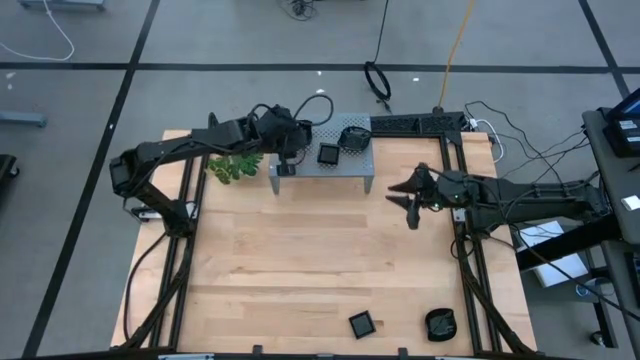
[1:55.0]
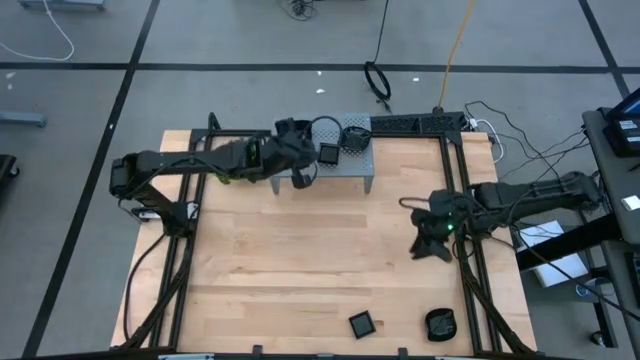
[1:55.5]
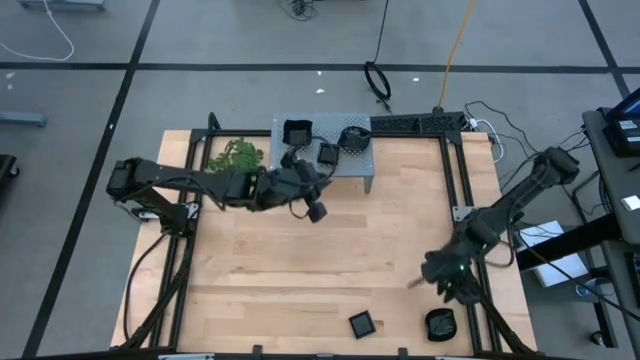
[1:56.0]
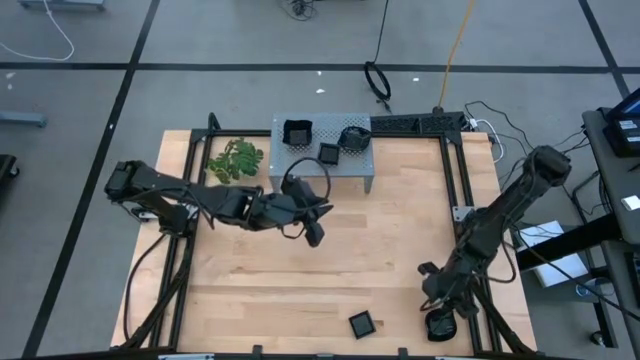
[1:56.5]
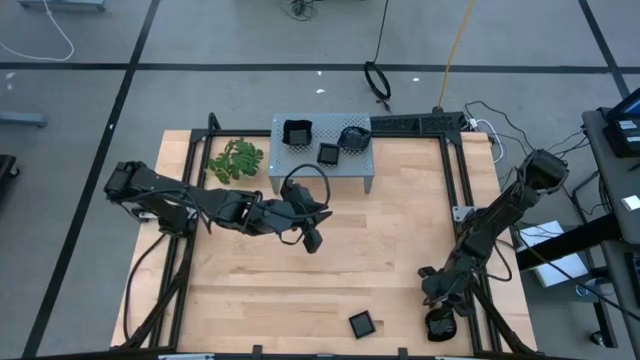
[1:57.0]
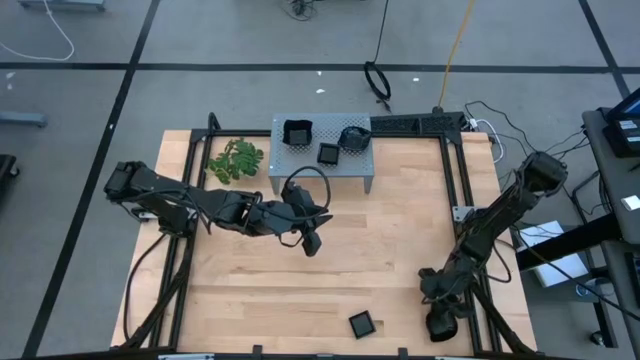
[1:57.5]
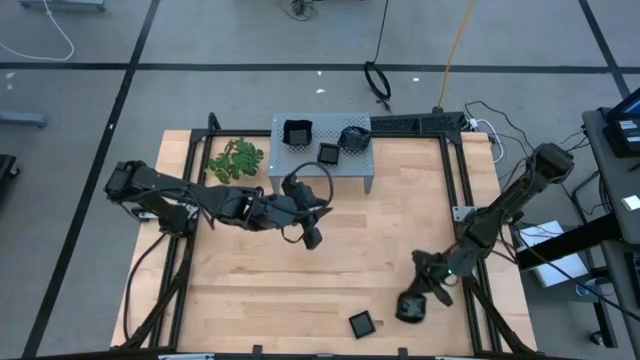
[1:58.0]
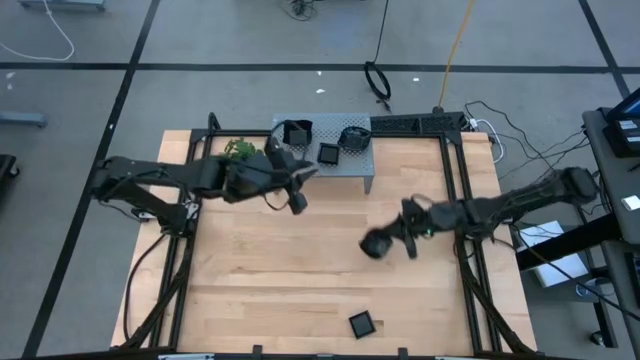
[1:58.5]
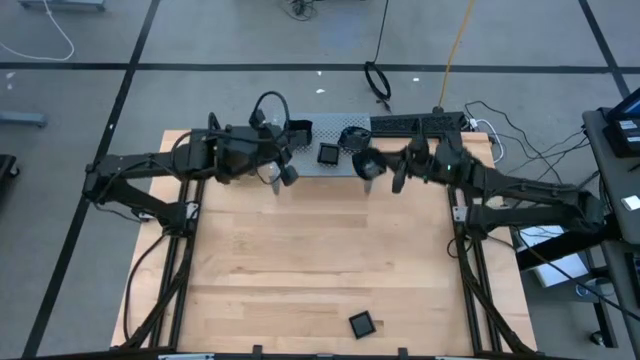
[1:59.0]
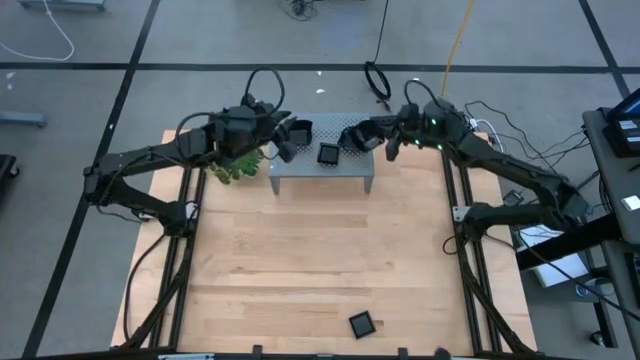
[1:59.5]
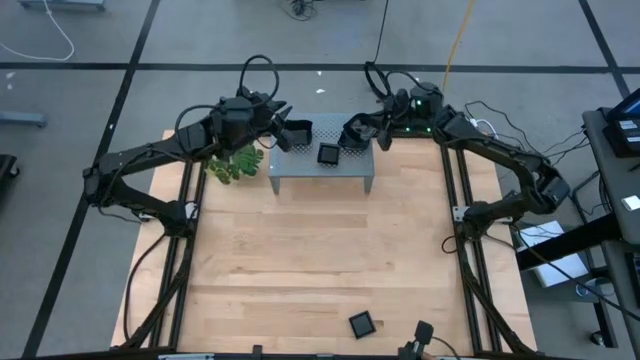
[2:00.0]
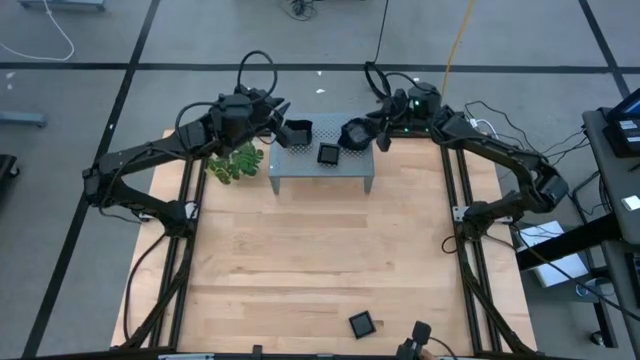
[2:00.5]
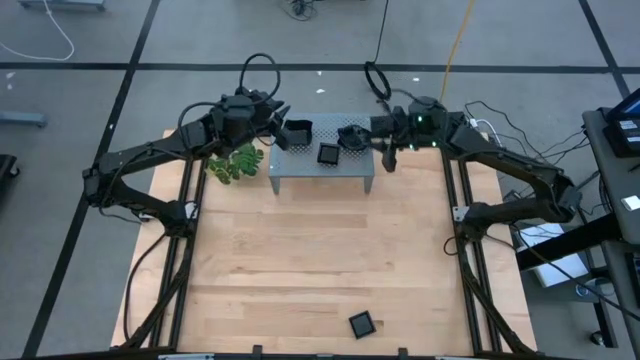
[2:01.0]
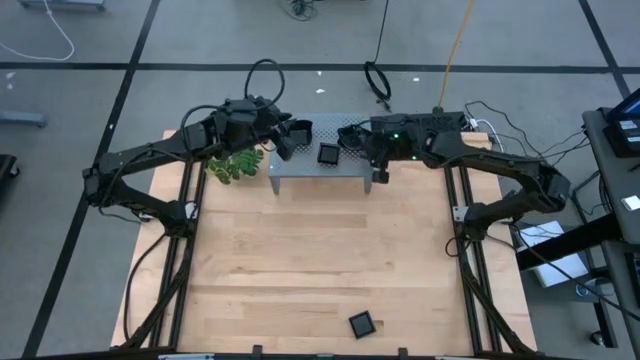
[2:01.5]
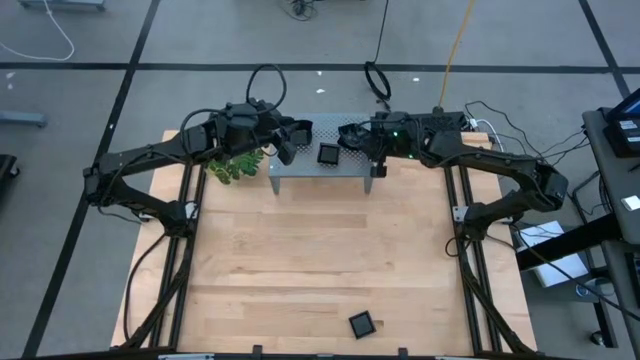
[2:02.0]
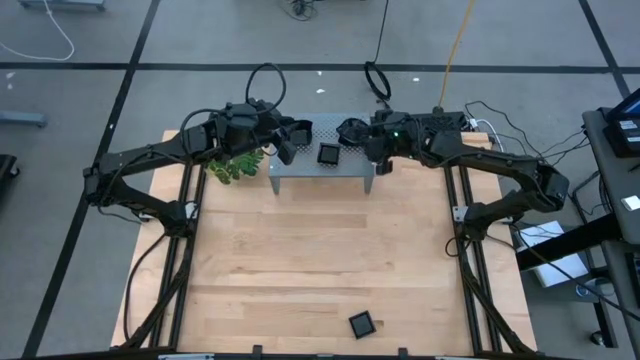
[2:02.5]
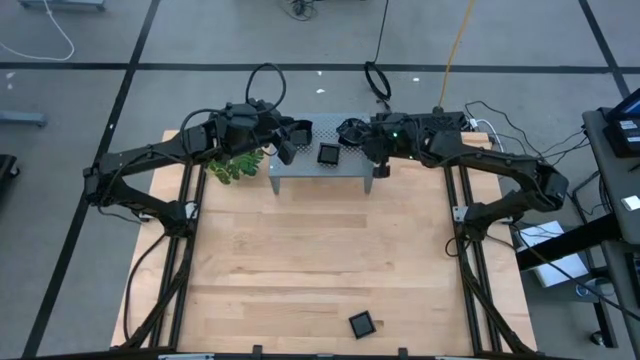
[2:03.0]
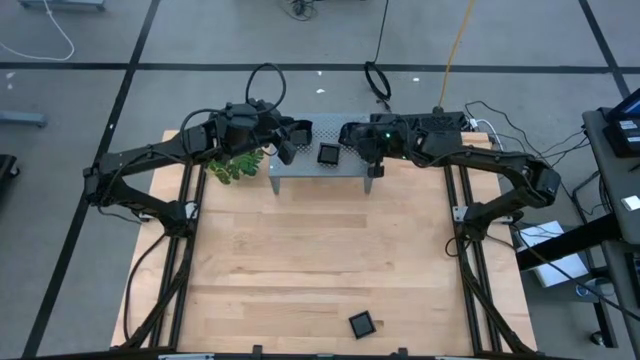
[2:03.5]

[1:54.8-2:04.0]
Task: Pick & Place Mini shaped plates
Stack the black leaf-shaped plate on top of the black leaf-shaped plate on the shelf

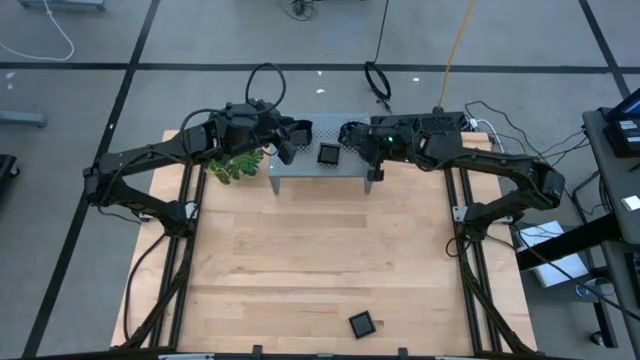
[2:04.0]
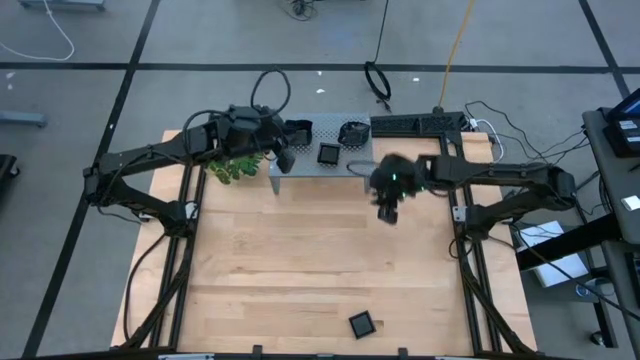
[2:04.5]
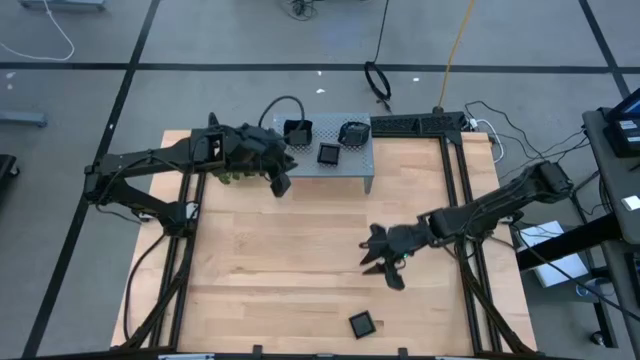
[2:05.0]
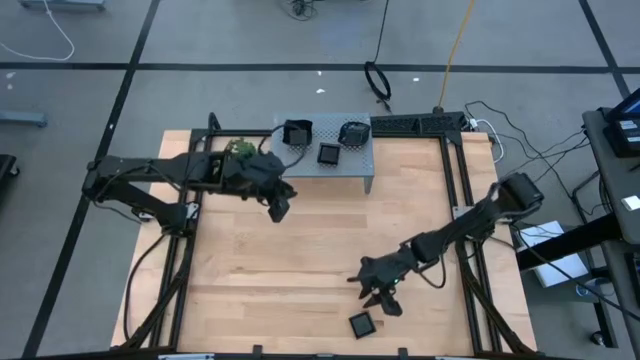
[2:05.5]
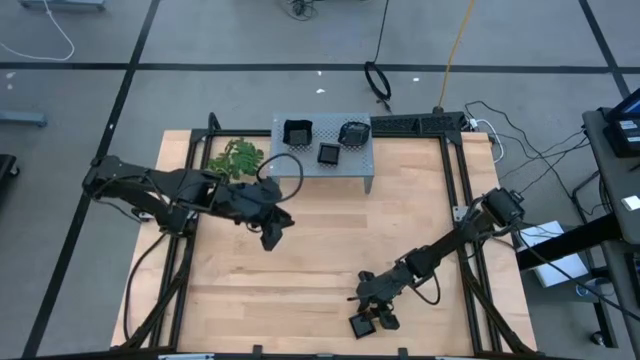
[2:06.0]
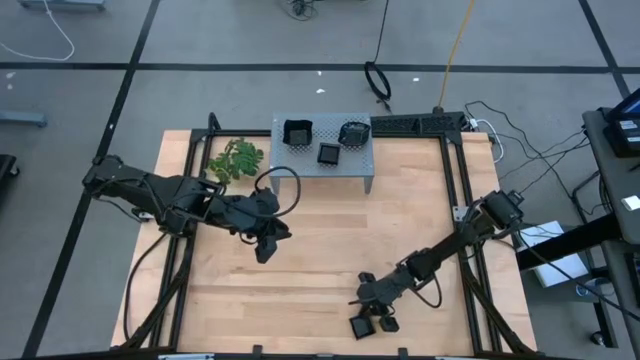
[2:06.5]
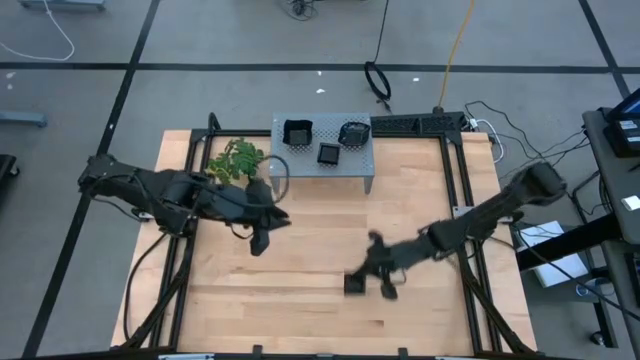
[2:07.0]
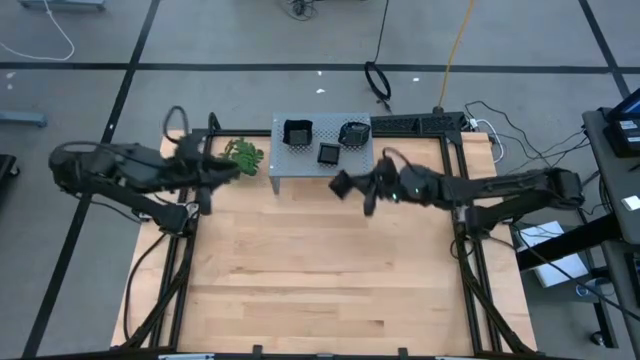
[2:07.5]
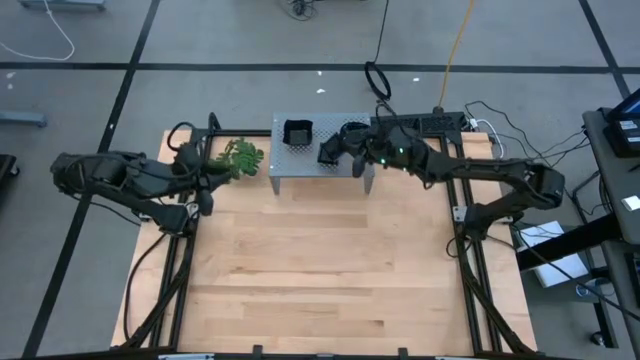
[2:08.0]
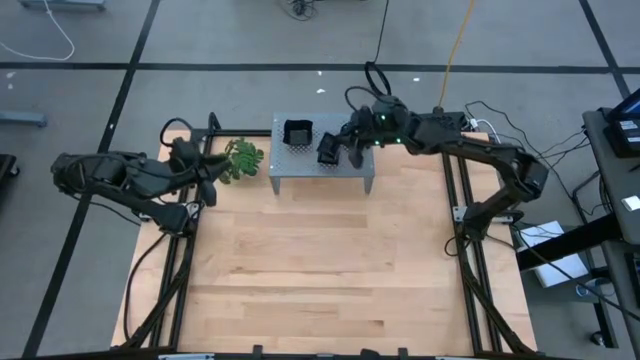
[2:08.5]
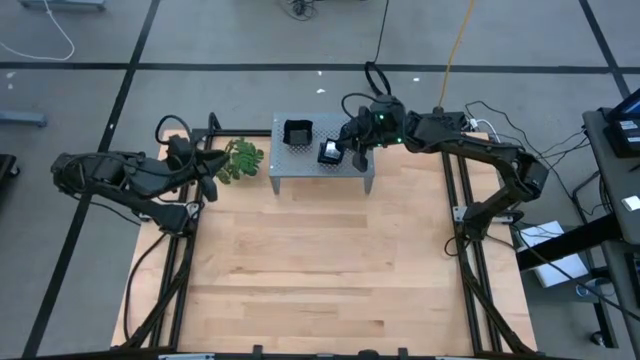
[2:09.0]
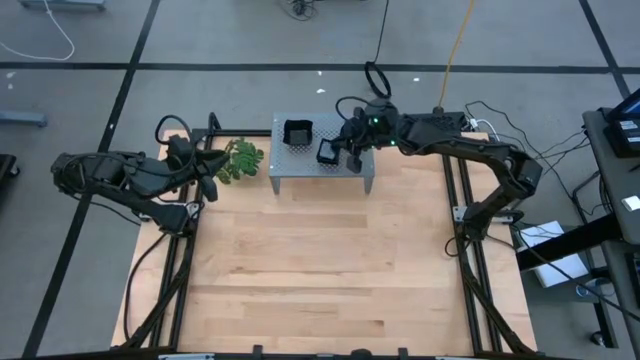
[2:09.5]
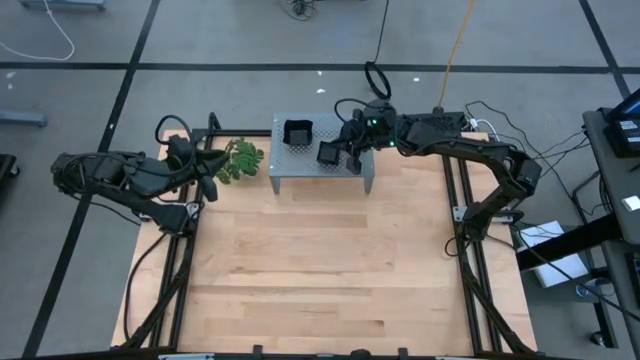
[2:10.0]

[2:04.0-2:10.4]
Stack the black square plate on top of the black square plate on the shelf

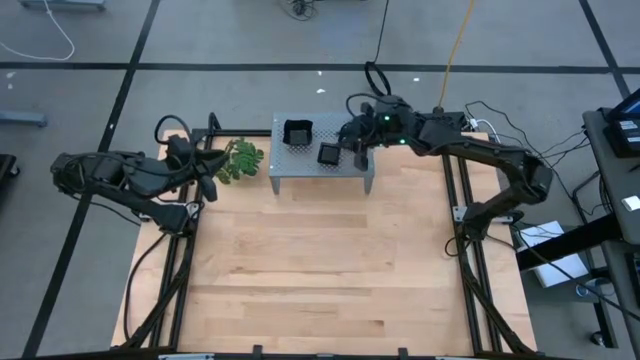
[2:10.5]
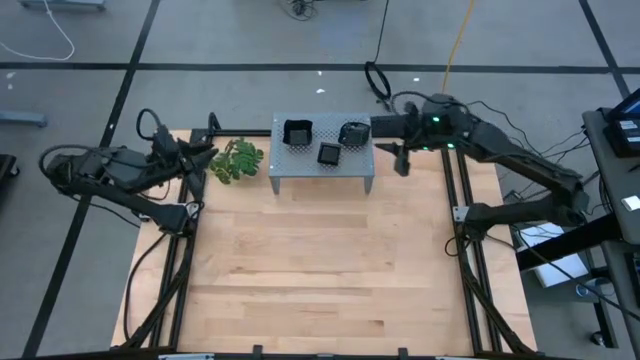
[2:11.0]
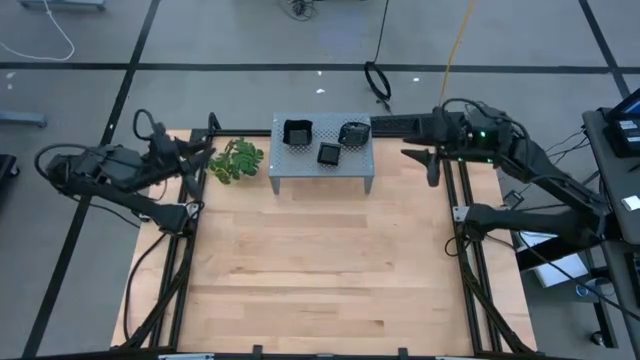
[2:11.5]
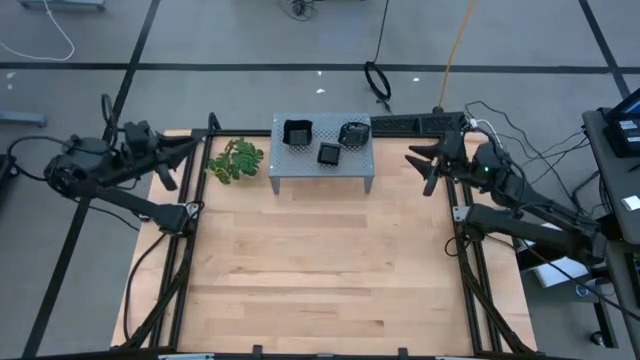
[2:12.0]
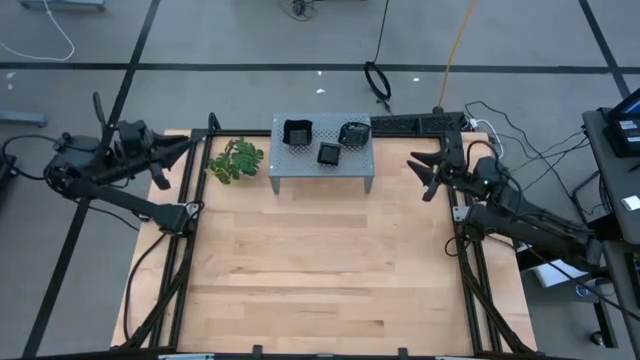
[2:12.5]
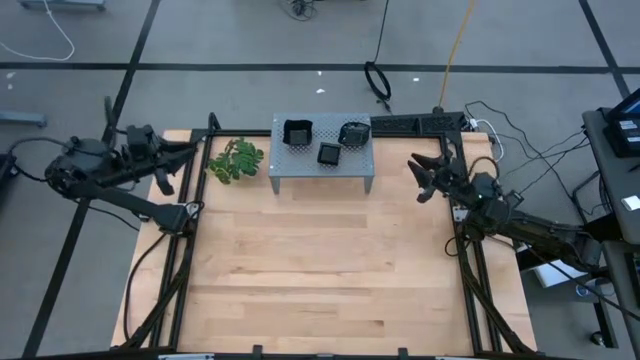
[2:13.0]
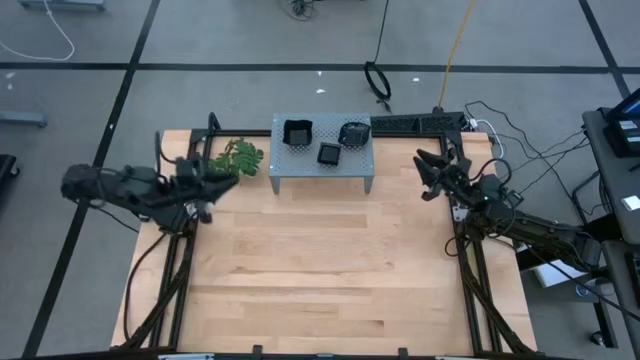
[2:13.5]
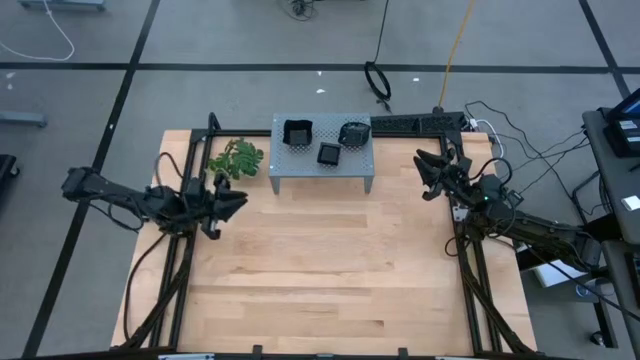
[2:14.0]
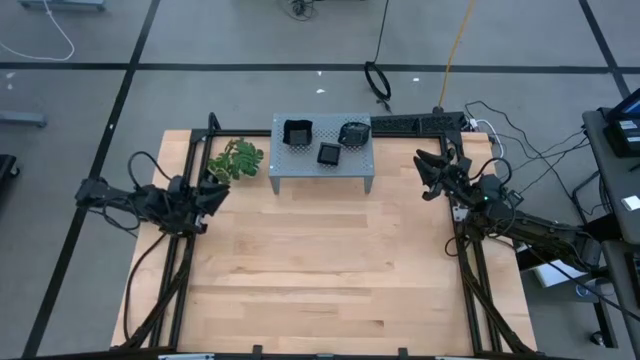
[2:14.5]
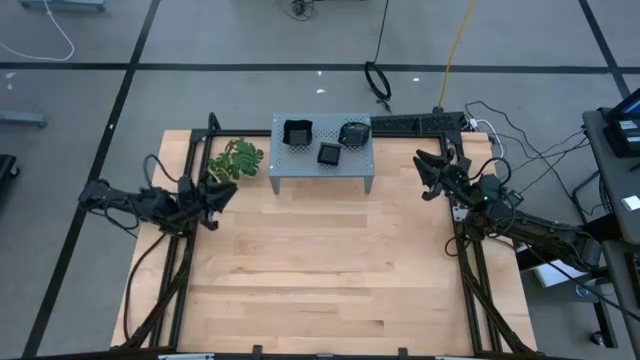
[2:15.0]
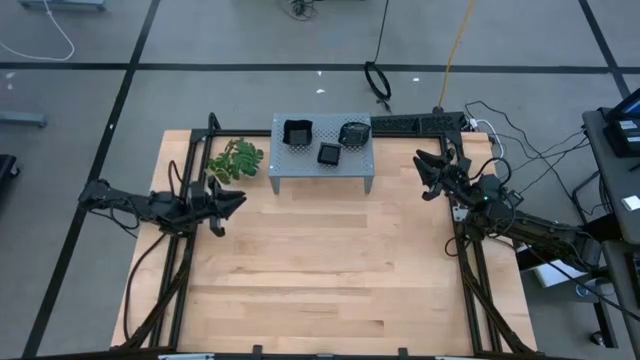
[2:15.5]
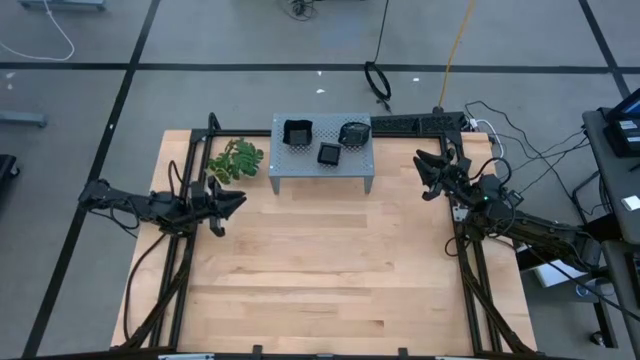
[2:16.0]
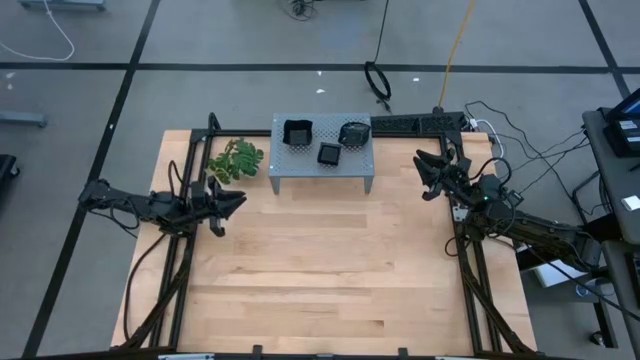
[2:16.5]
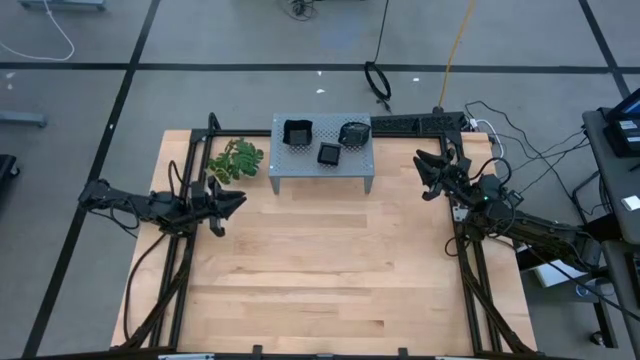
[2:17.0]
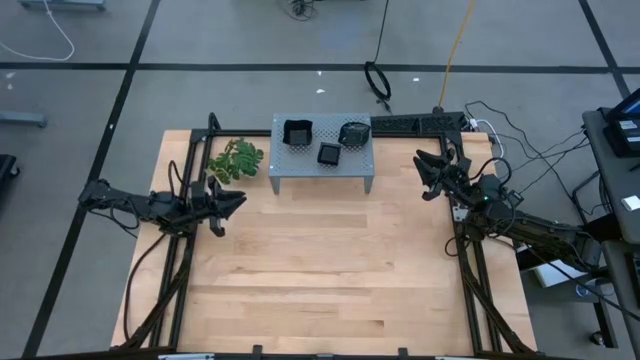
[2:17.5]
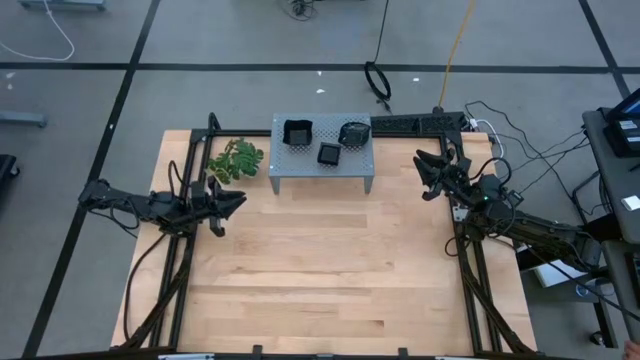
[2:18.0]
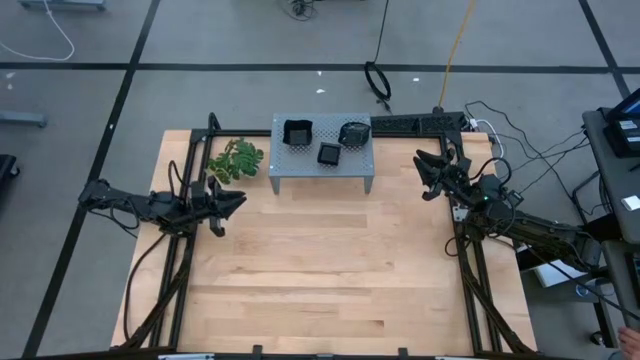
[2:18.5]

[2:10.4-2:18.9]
Return to Home Position
